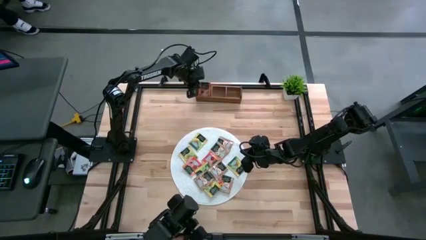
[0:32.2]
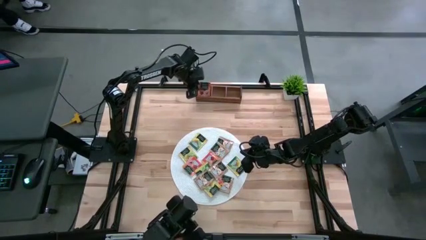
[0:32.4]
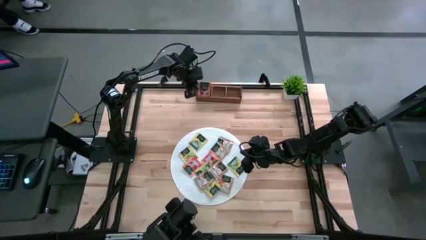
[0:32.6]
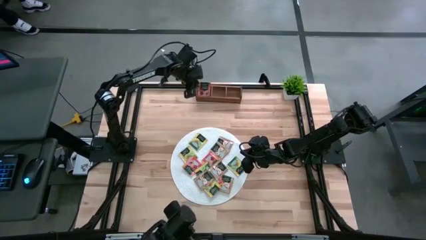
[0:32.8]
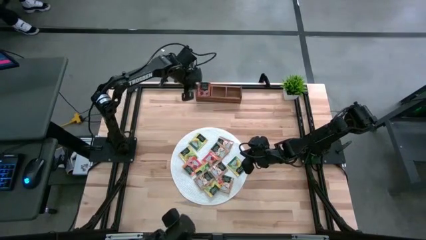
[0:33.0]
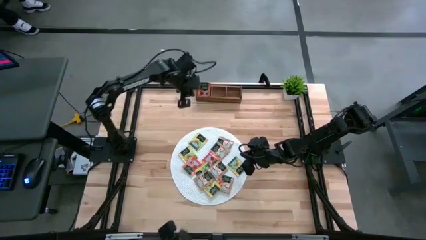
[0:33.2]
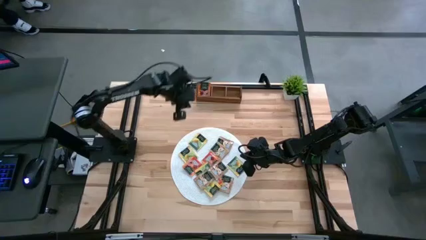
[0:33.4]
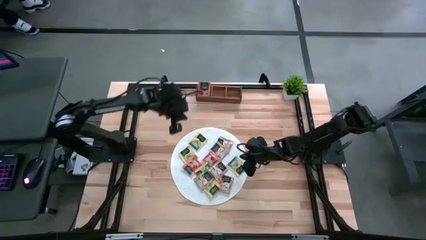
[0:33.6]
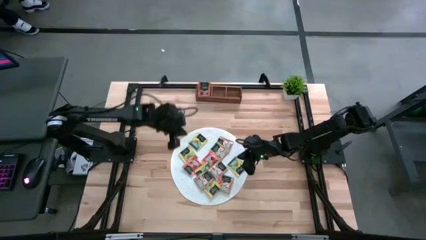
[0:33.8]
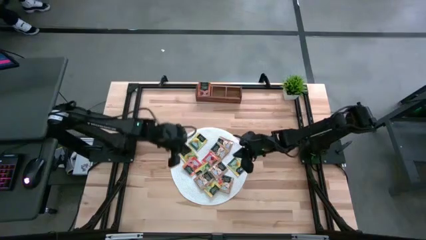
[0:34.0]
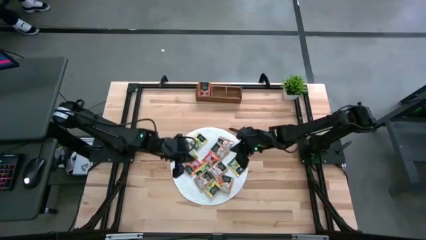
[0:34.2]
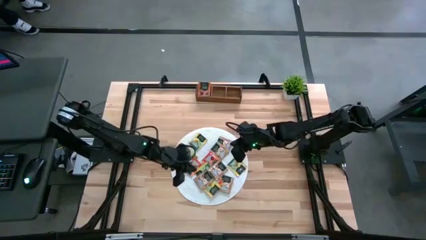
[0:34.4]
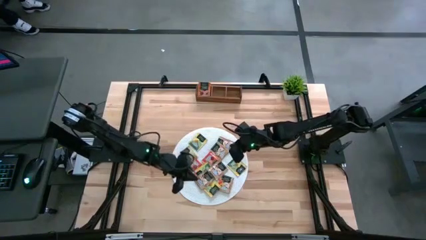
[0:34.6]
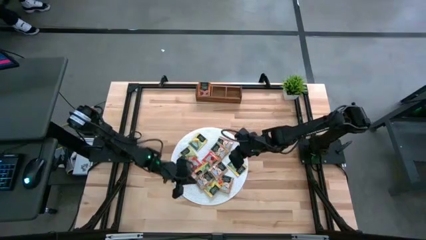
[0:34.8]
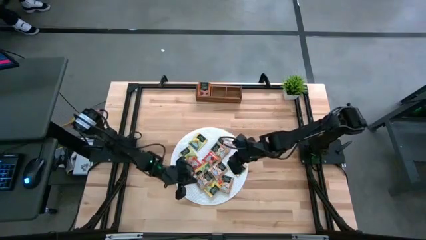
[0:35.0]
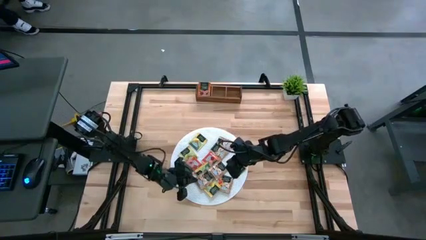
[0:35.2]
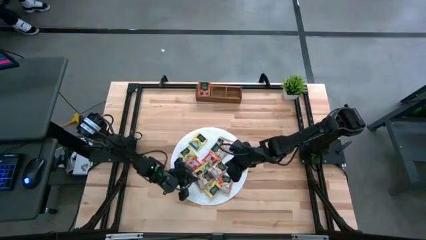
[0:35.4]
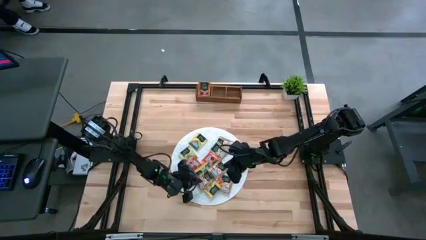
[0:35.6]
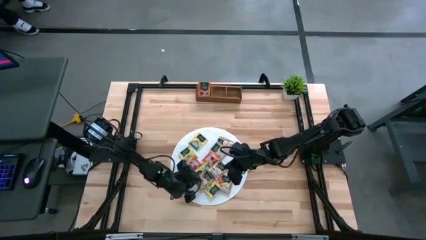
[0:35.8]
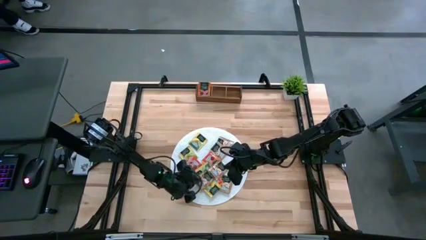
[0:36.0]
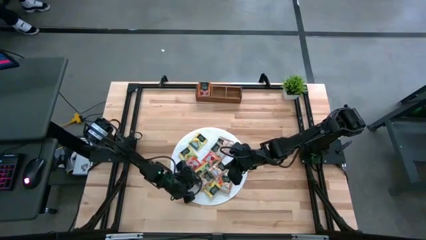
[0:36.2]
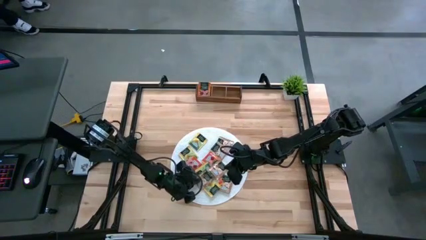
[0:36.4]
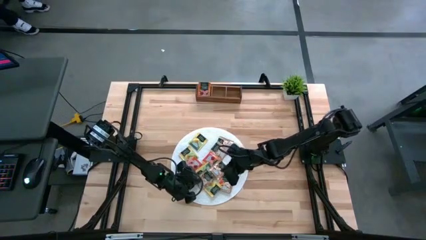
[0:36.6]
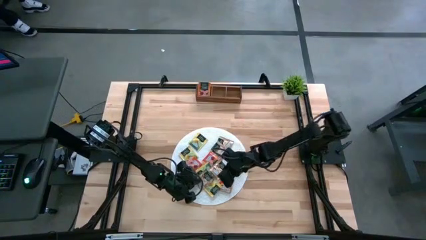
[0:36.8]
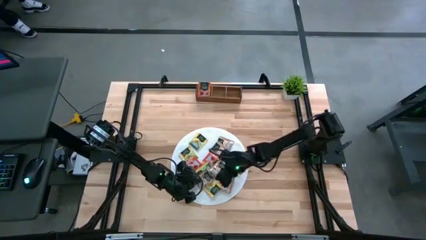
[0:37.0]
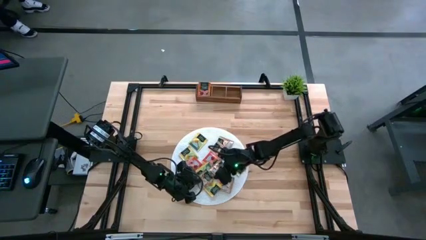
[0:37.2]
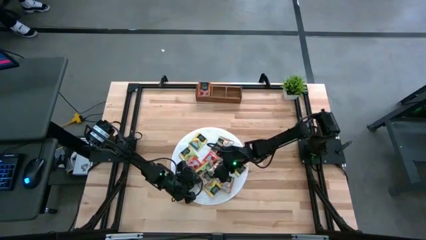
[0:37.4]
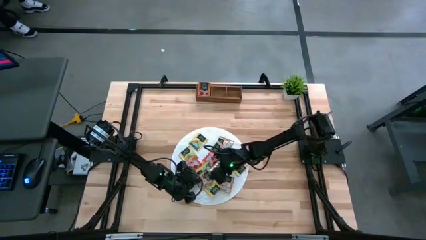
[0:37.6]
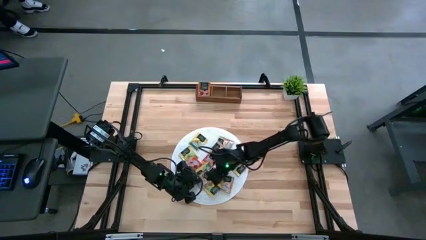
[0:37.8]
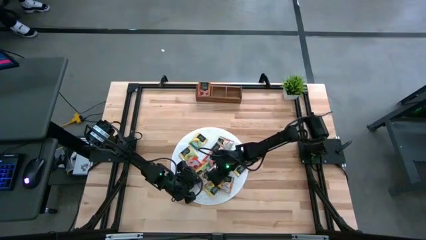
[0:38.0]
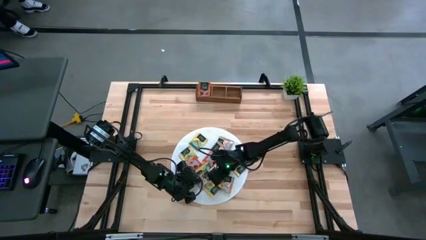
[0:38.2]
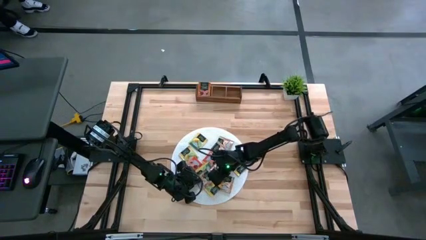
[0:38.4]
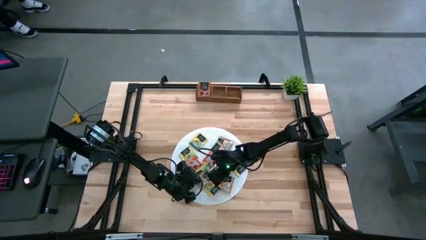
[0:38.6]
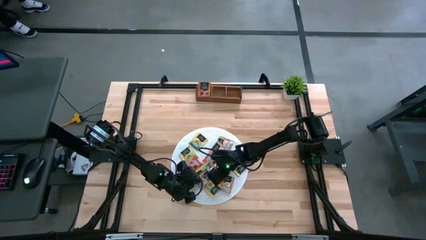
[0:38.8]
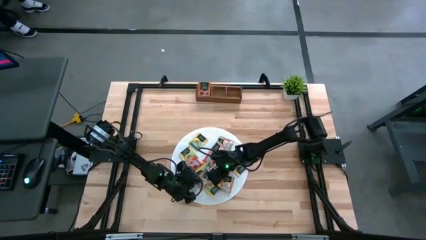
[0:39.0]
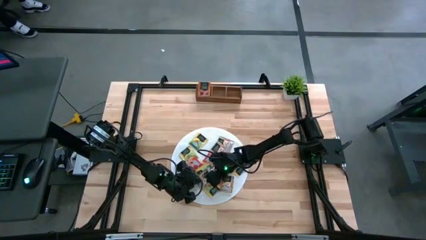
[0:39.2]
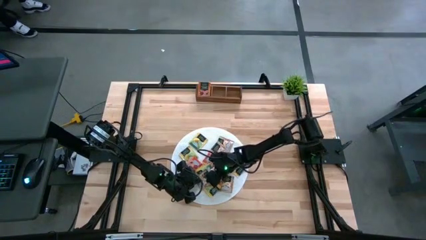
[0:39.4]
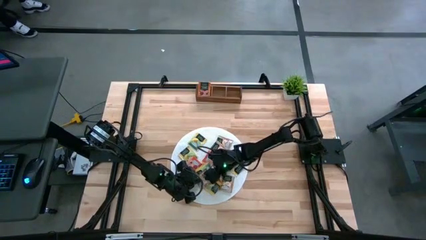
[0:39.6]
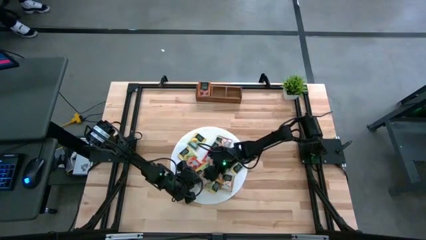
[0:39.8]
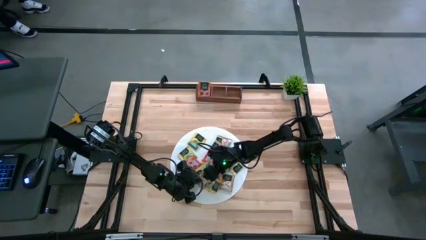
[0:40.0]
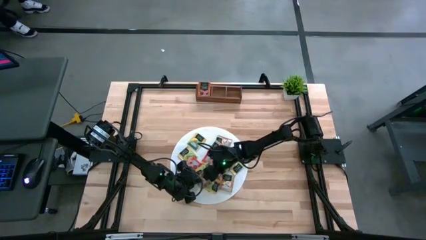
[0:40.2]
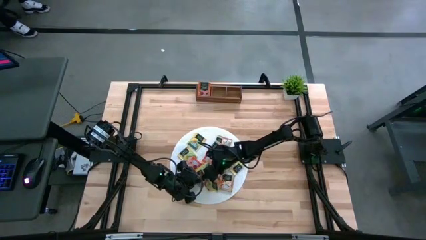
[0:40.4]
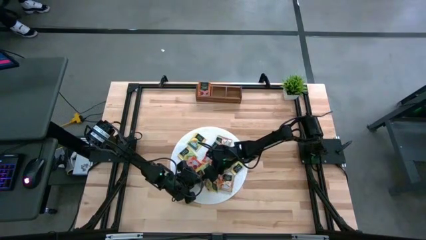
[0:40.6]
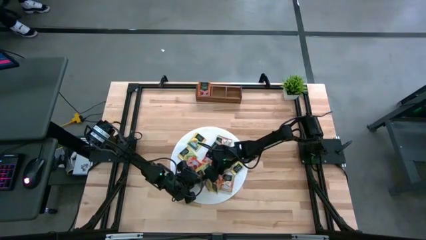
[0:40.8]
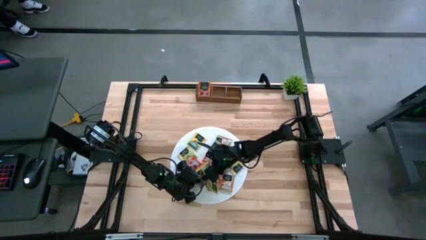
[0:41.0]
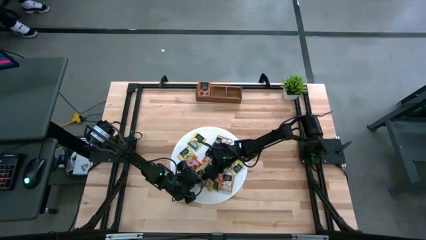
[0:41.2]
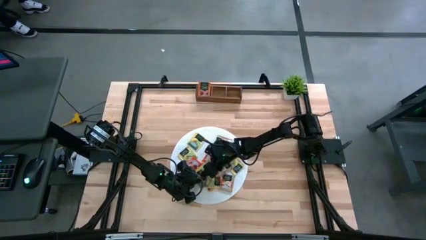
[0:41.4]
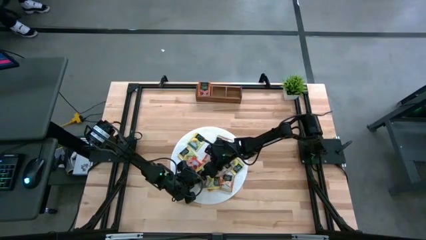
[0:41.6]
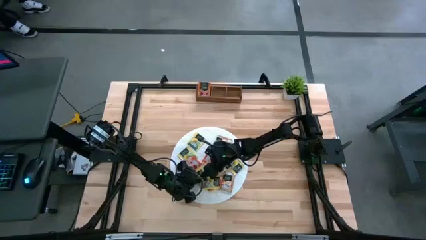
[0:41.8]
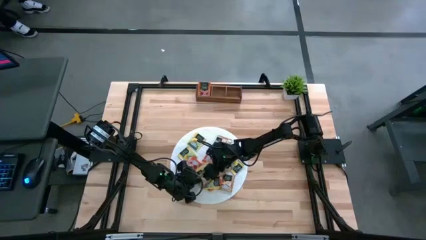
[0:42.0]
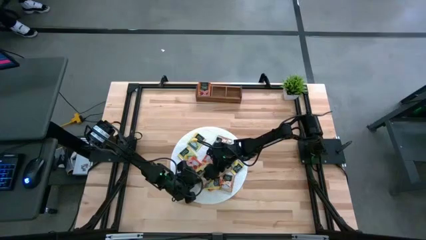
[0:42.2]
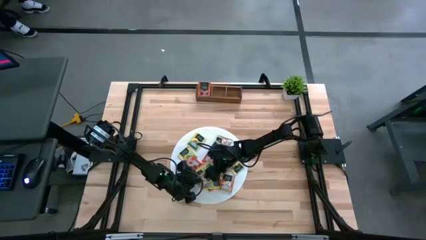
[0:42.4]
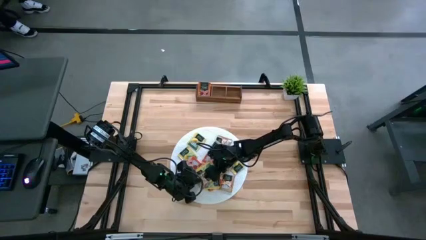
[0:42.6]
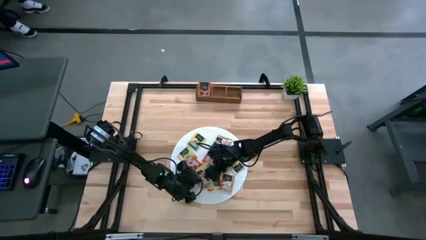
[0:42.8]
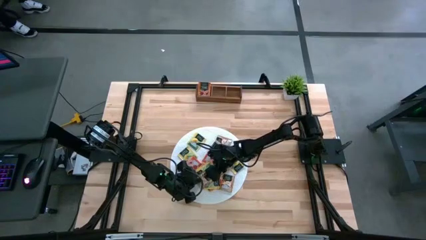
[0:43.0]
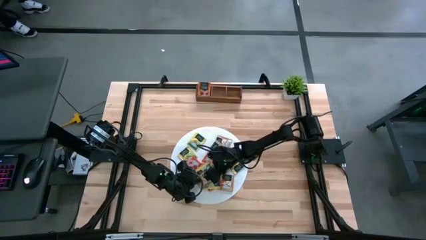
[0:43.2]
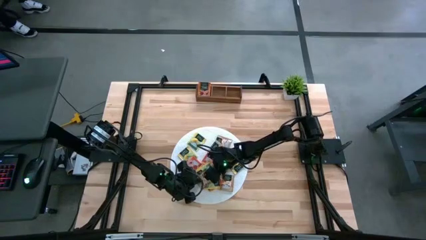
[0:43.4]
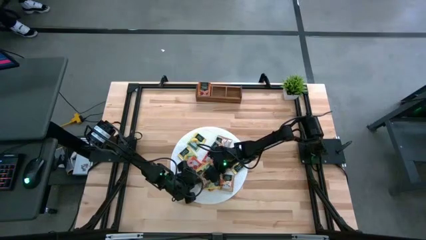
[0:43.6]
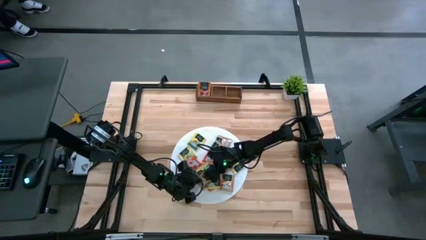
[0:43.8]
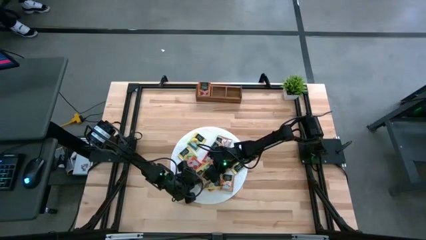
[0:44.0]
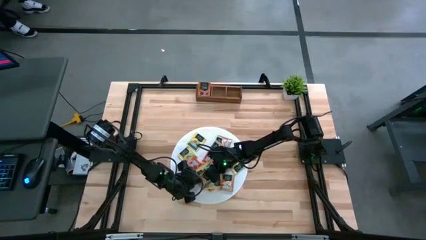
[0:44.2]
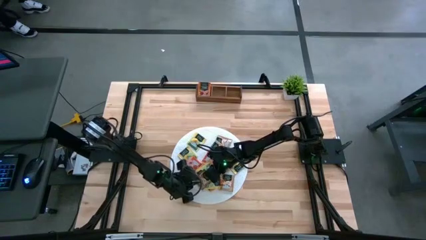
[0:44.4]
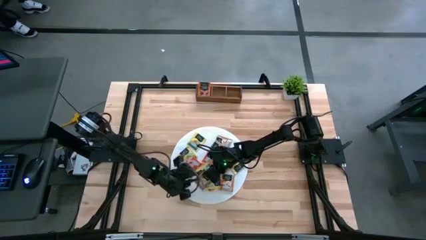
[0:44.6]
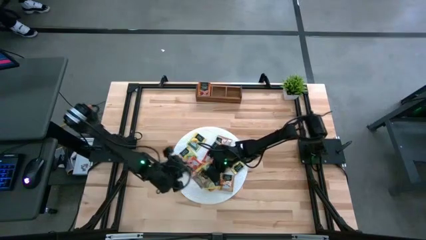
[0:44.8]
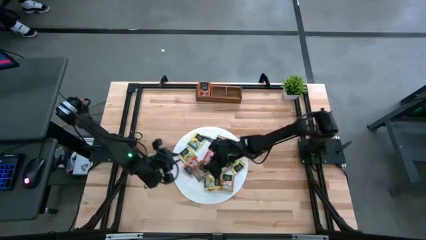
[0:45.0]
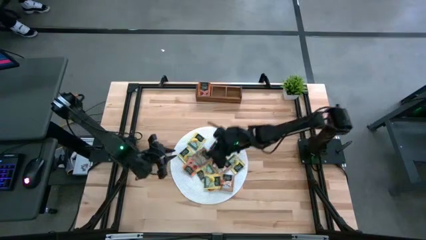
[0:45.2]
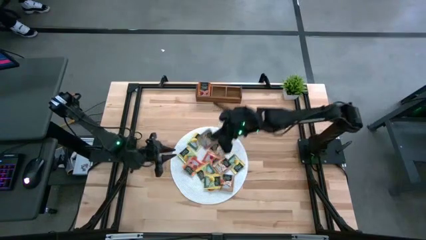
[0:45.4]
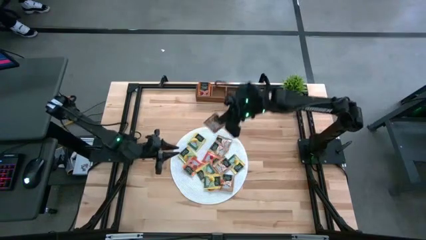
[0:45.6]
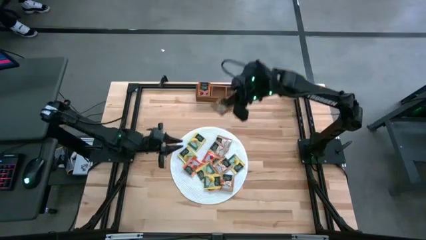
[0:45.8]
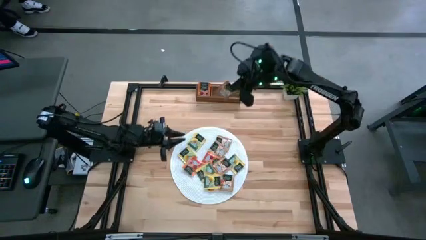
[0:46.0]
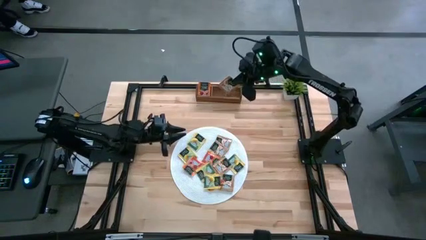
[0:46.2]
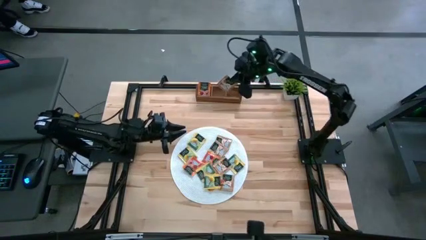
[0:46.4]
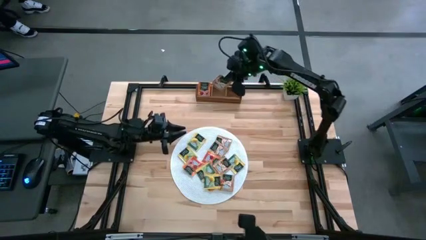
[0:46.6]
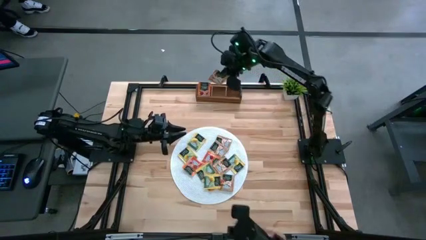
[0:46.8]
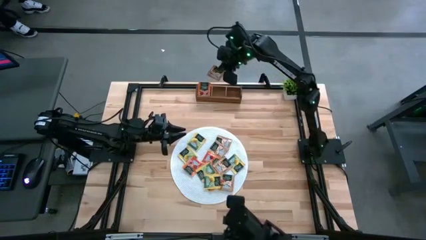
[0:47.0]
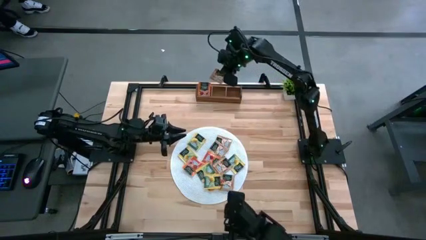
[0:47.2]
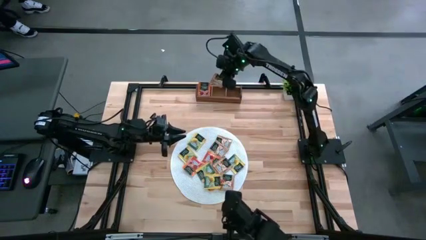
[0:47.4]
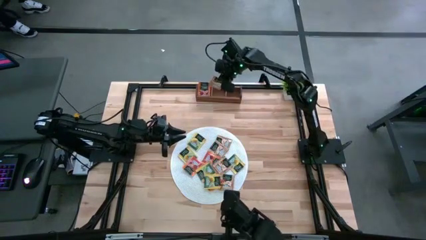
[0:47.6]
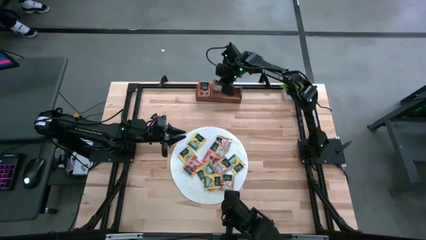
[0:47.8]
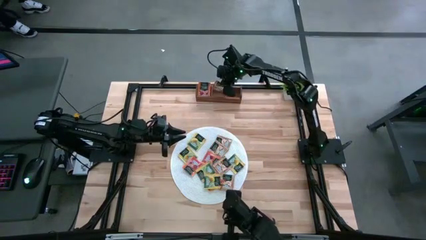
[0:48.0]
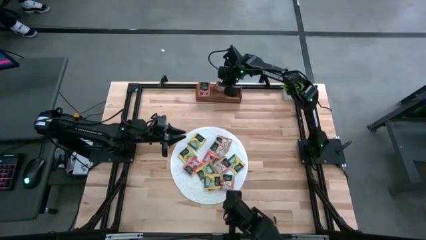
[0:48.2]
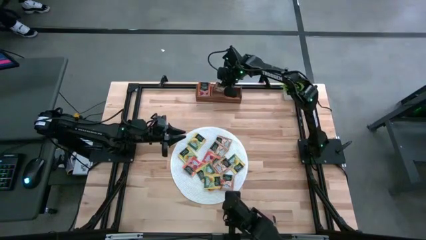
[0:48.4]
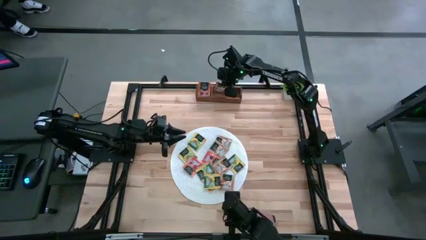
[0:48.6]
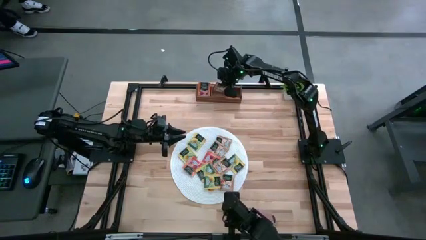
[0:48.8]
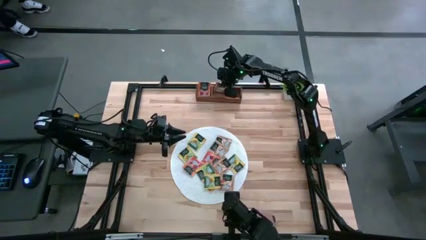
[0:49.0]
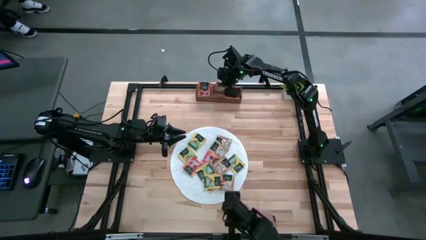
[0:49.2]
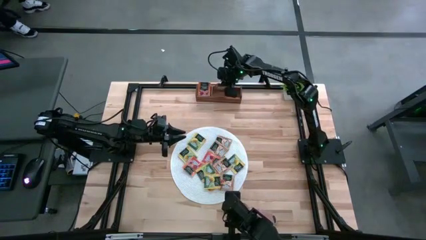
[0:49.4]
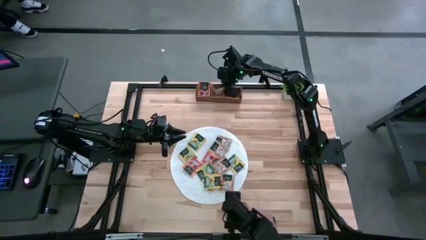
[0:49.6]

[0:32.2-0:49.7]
Task: Pick & Place Tea
Put the brown tea bag into the middle section of the wooden organizer
